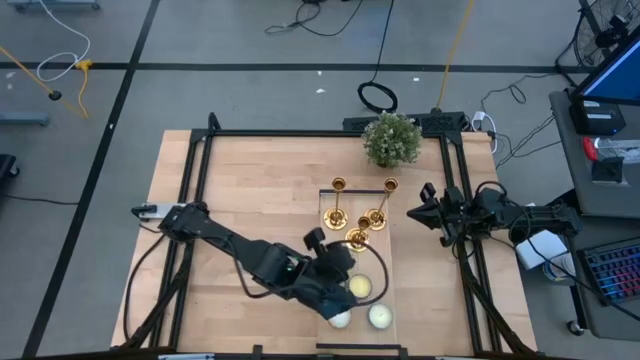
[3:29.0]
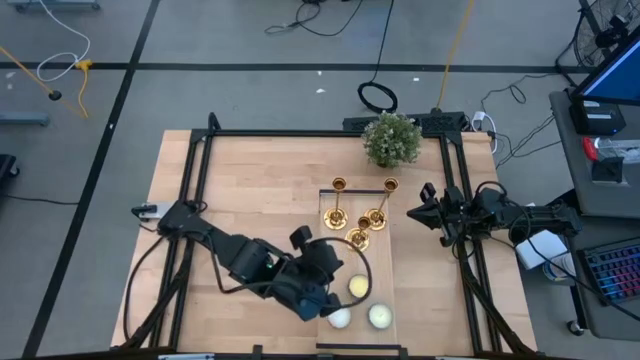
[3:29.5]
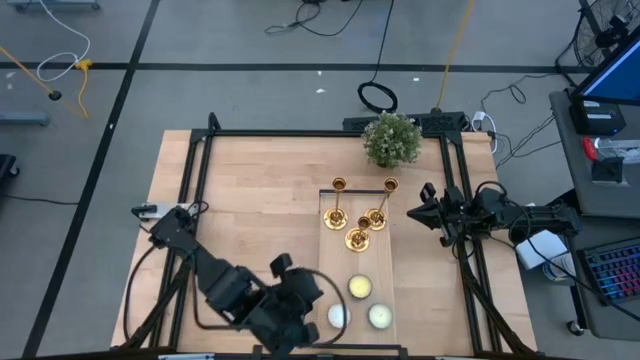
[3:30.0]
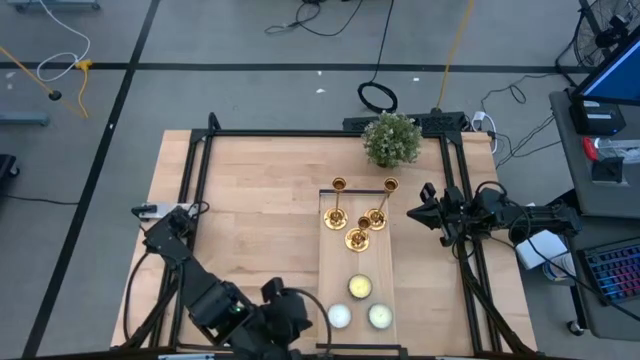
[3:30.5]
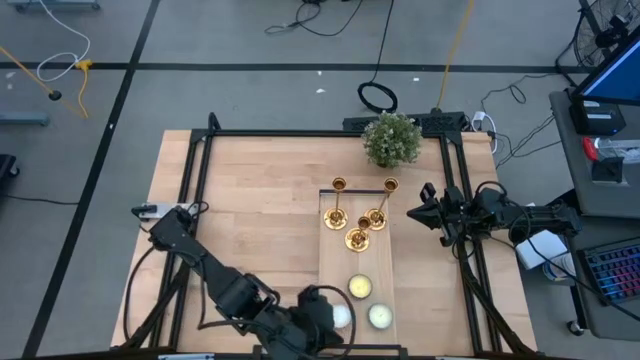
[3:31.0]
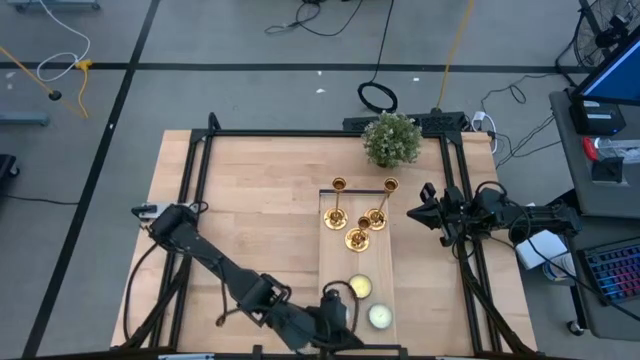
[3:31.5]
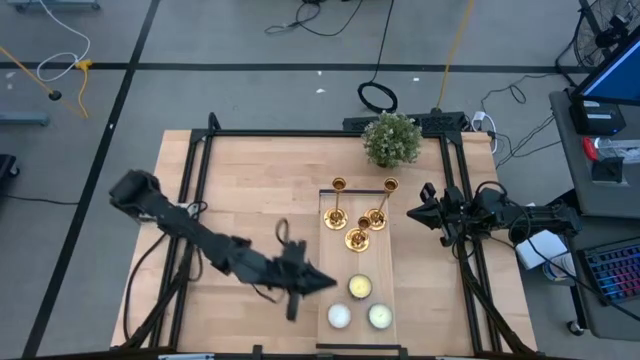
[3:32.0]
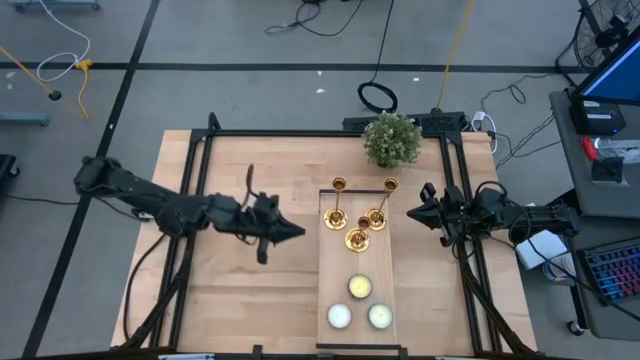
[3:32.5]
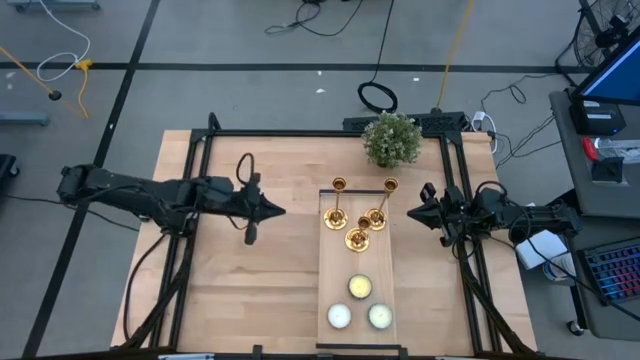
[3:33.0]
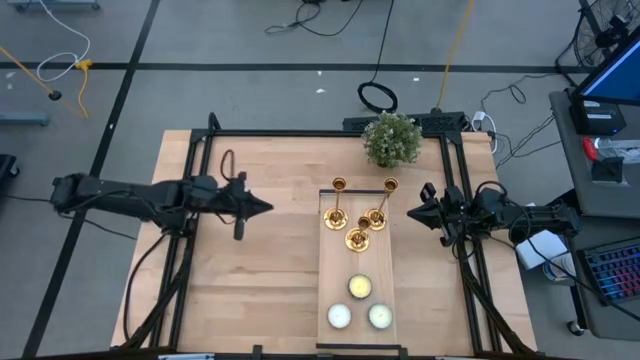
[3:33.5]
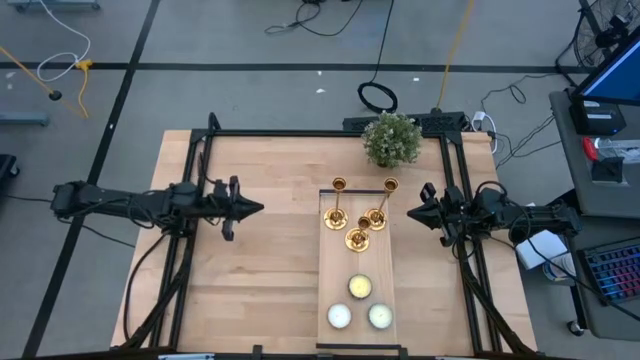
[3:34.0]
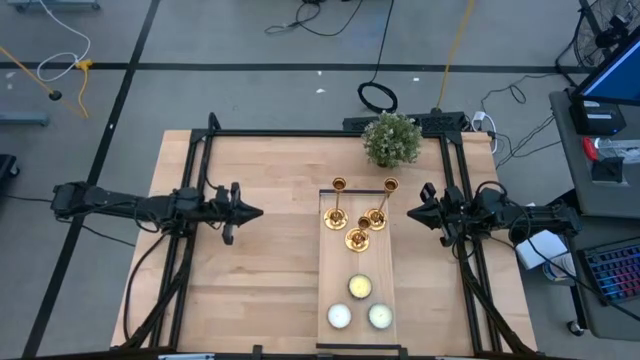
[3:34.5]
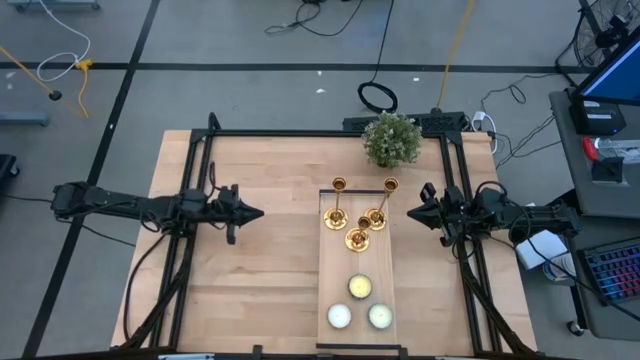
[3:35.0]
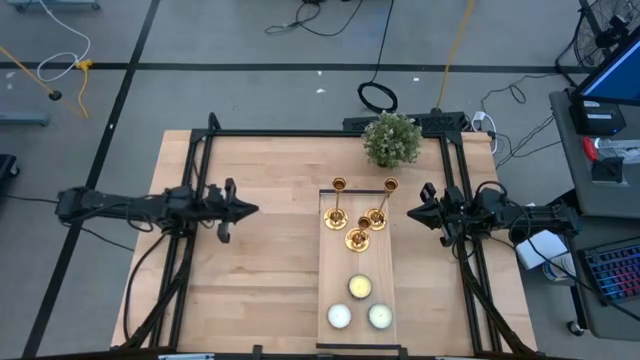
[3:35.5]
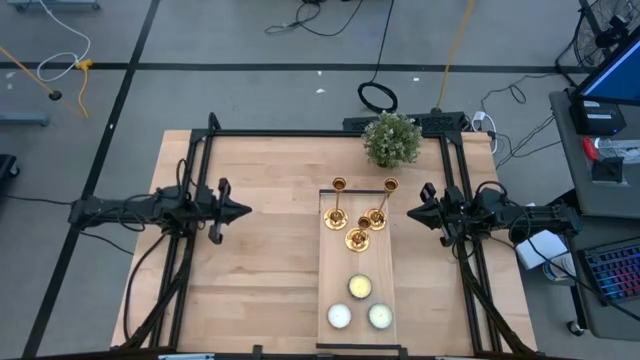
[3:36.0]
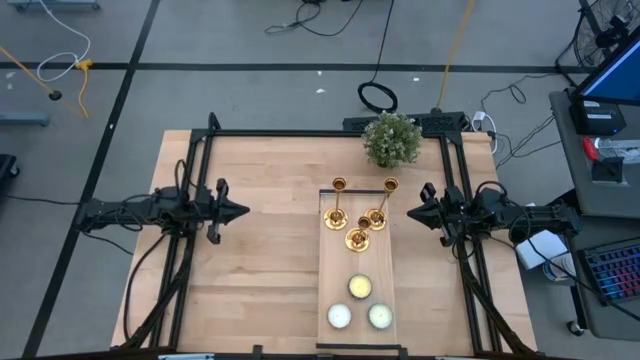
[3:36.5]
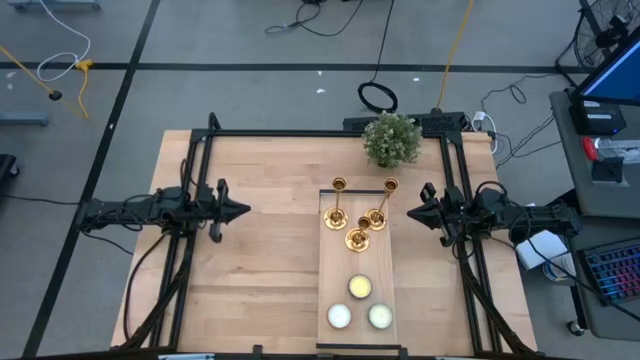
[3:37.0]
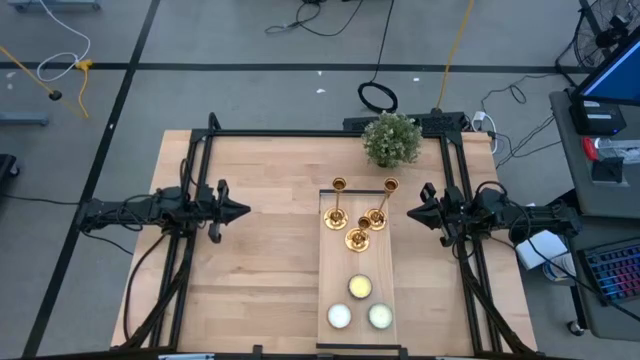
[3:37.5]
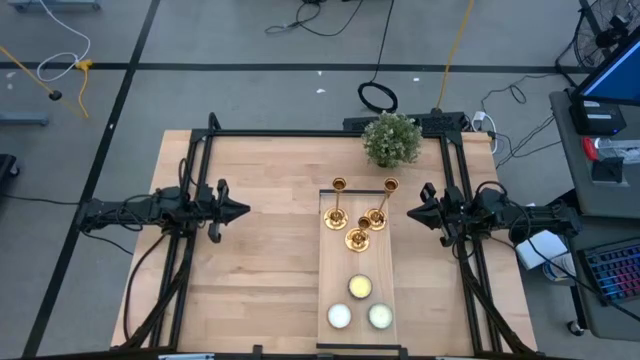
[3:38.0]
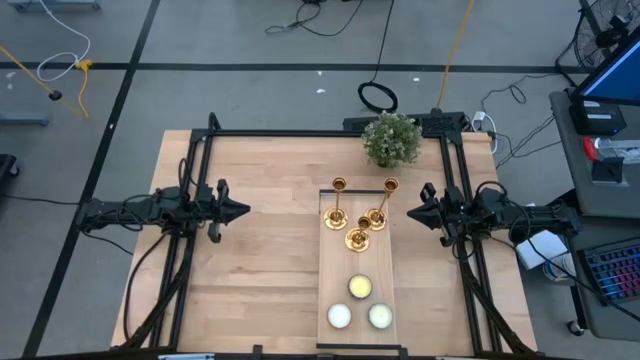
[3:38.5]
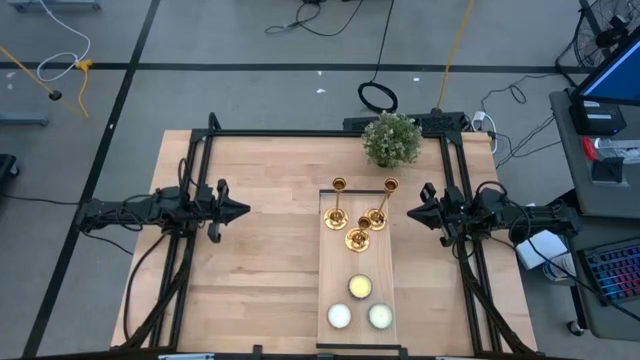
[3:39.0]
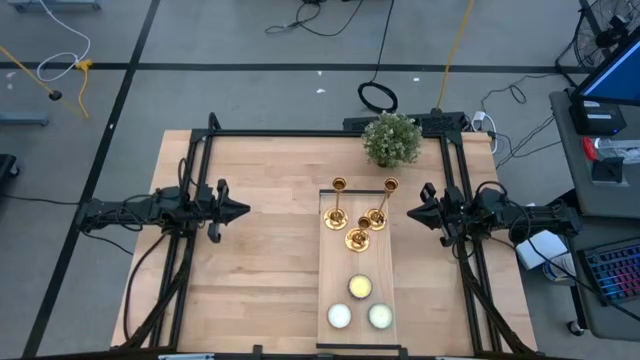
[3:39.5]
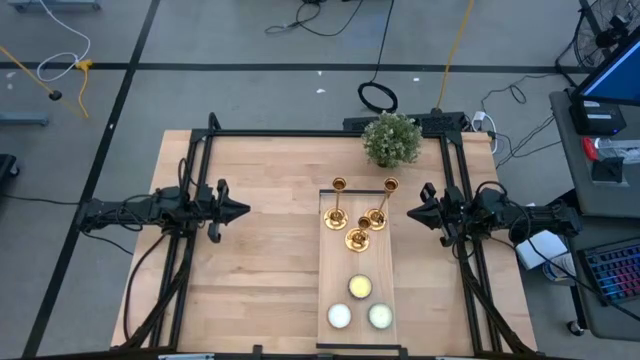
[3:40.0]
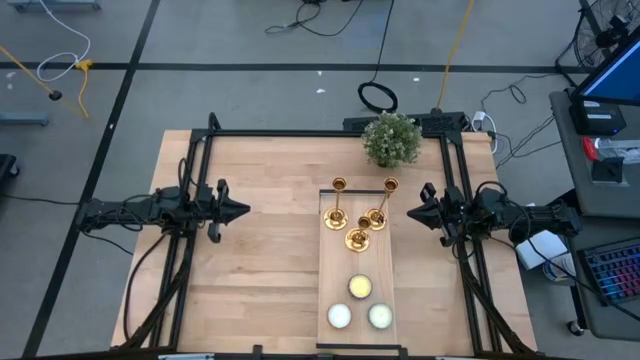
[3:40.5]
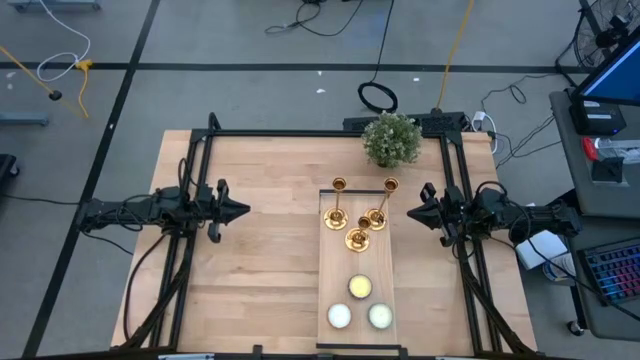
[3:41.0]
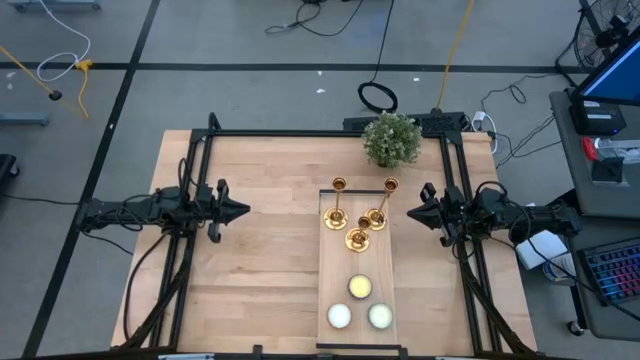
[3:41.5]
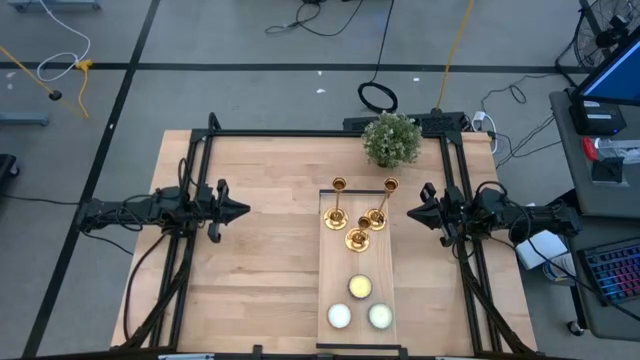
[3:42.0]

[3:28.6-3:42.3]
Task: Pick & Place candle stick holders
Return to Home Position

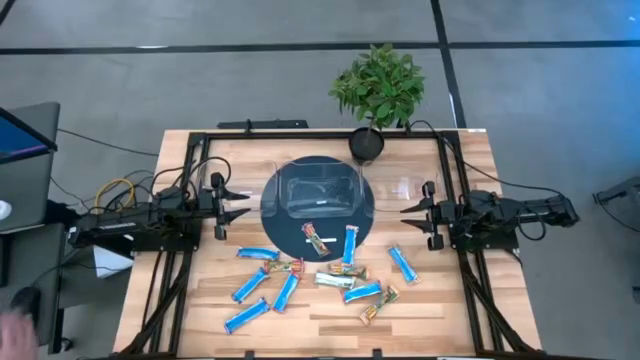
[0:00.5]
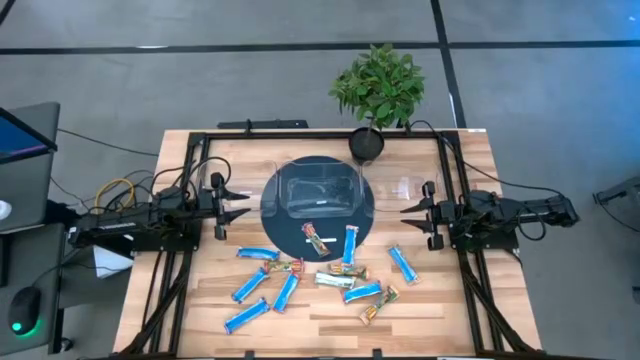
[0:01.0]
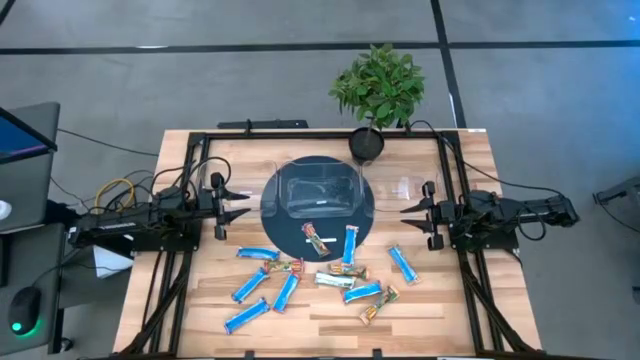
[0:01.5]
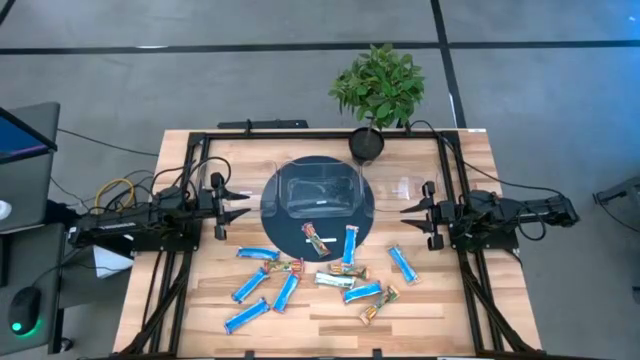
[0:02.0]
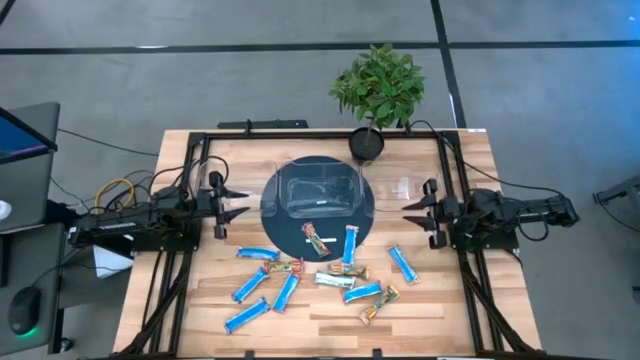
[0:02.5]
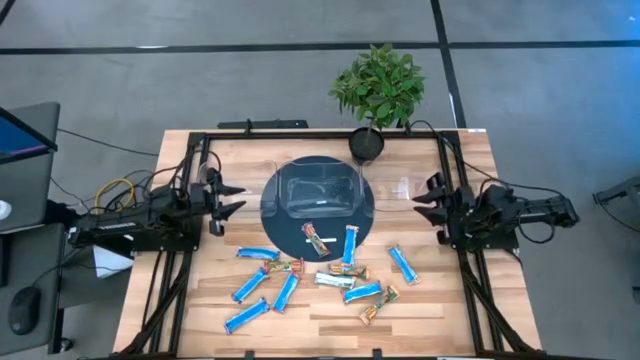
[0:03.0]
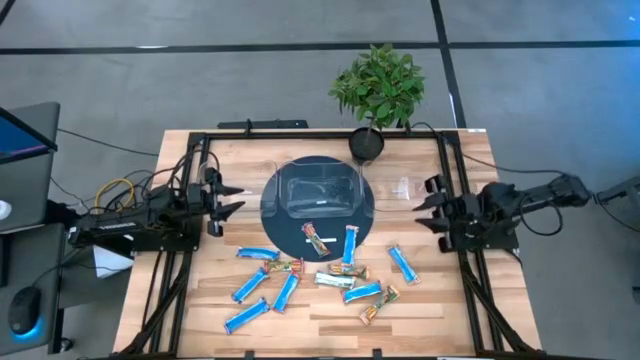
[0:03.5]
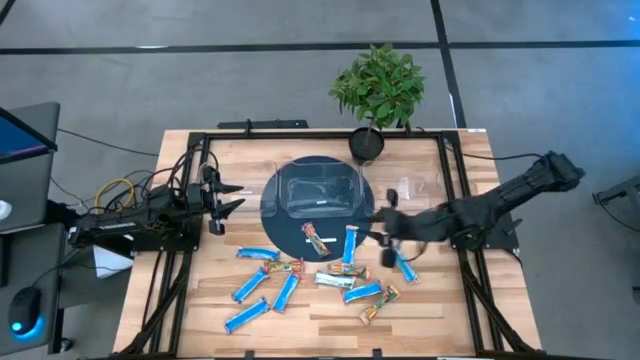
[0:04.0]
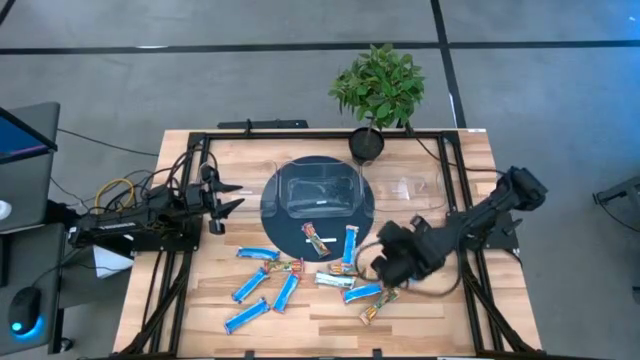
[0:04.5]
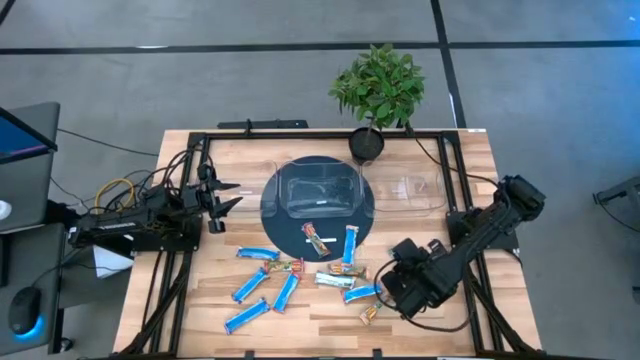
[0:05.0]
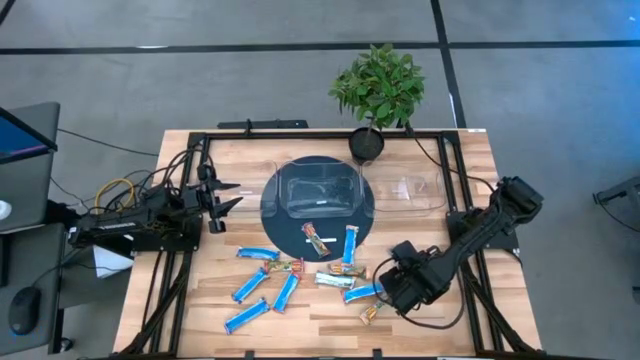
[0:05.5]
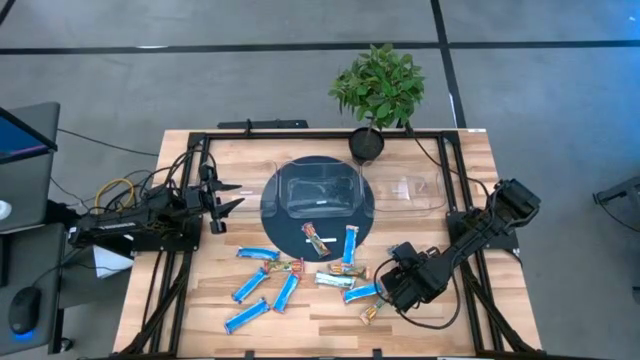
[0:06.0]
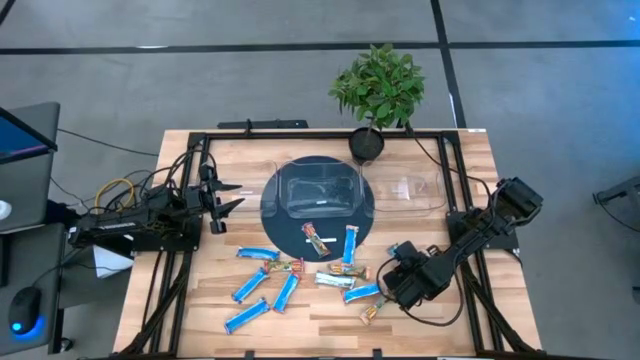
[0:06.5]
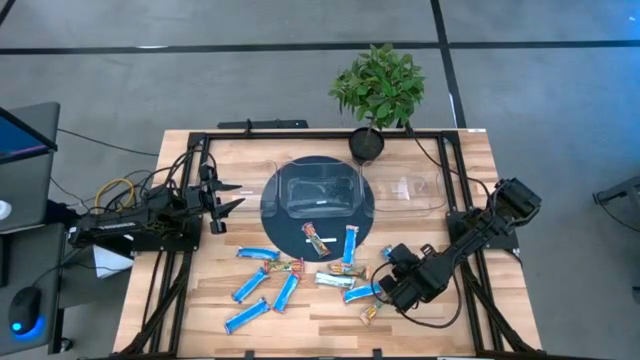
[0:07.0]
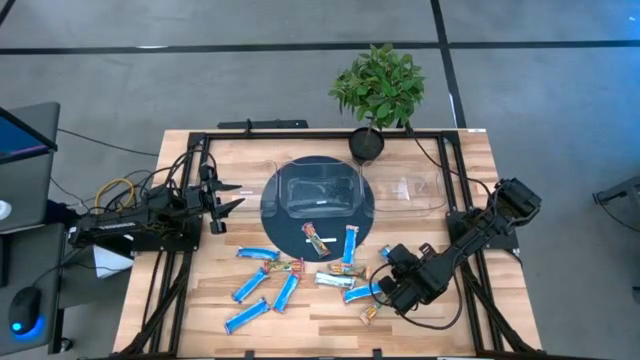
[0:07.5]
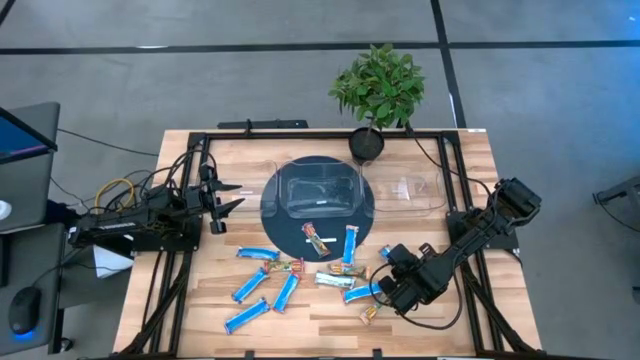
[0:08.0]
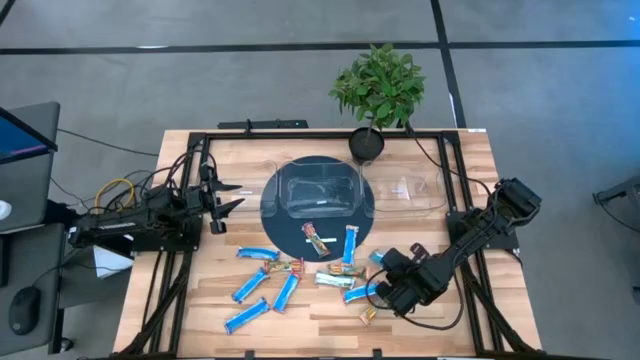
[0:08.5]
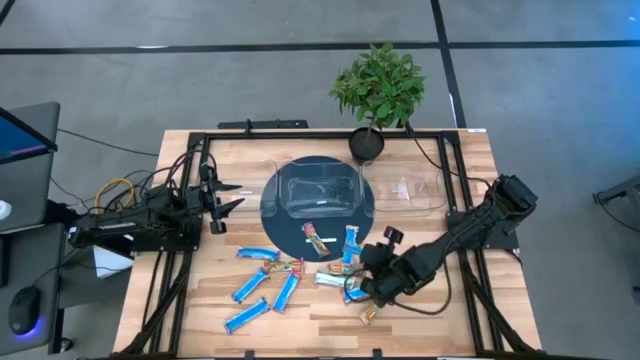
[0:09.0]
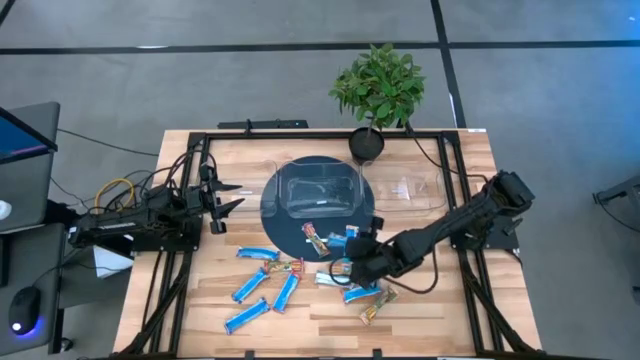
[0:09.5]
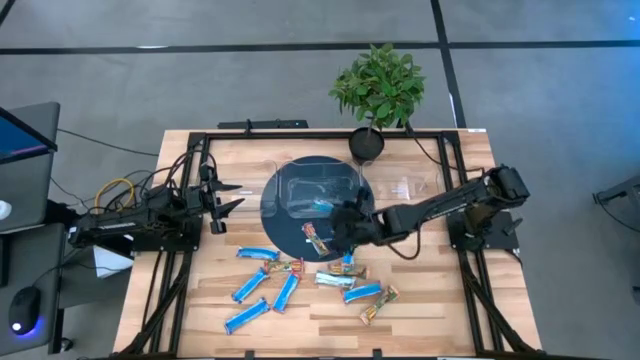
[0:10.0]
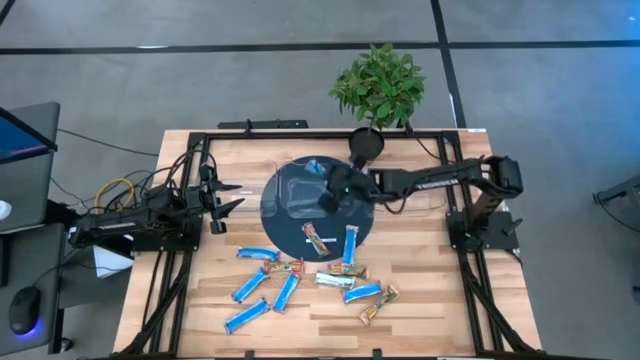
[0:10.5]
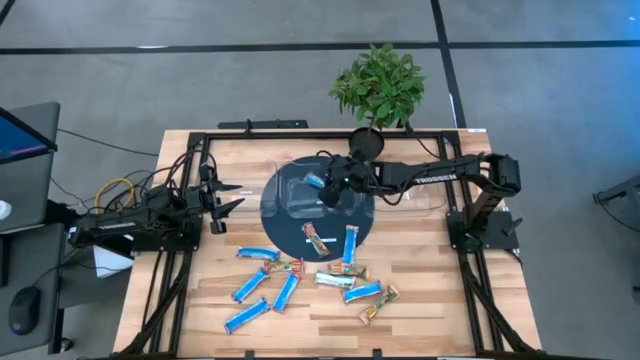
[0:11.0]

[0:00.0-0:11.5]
Task: Pick and place Granola Bars by type
Put the orange snack bar into the middle transparent bin
